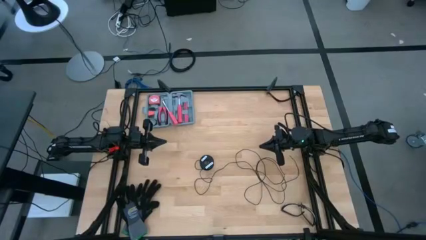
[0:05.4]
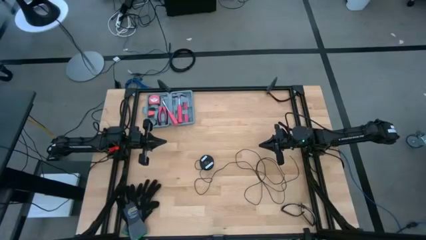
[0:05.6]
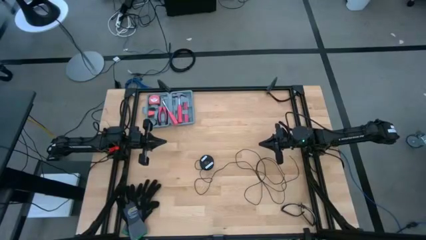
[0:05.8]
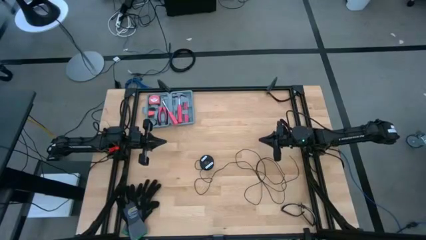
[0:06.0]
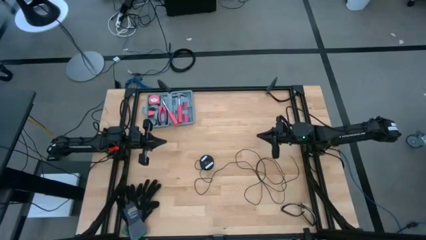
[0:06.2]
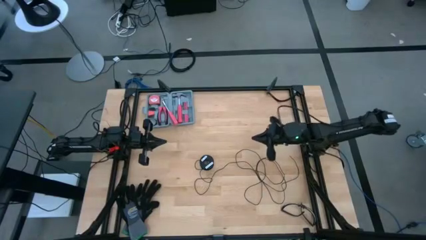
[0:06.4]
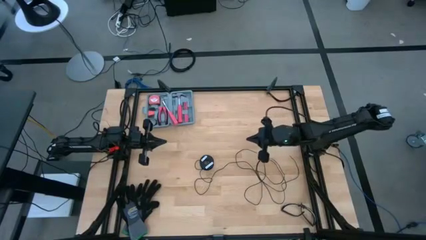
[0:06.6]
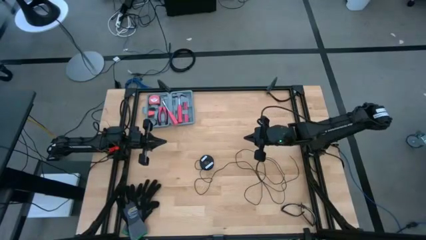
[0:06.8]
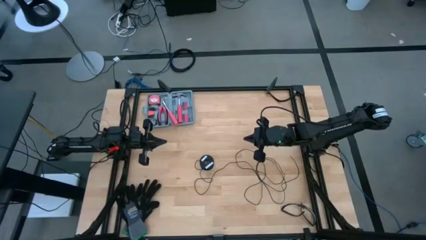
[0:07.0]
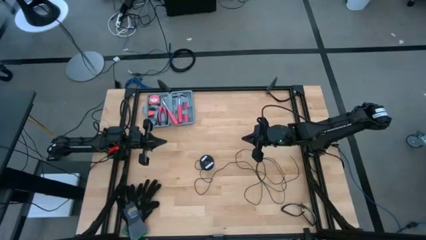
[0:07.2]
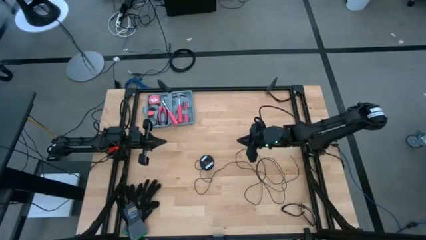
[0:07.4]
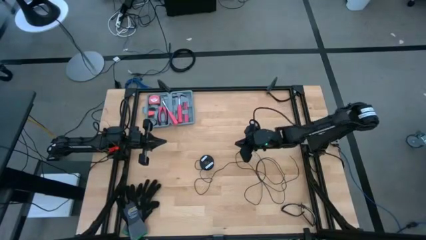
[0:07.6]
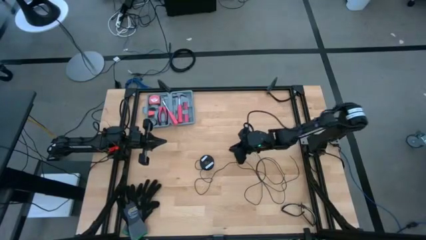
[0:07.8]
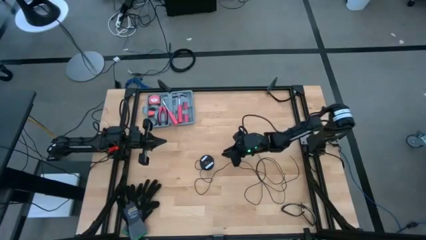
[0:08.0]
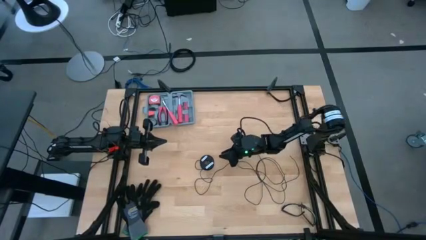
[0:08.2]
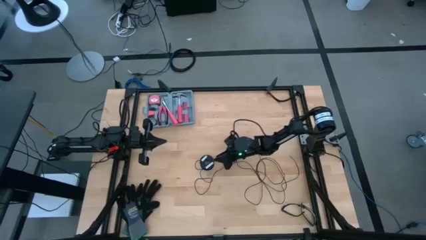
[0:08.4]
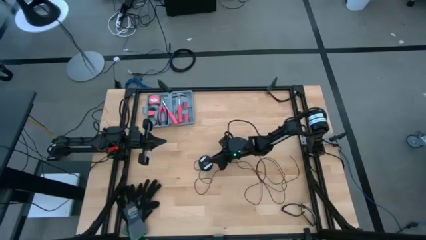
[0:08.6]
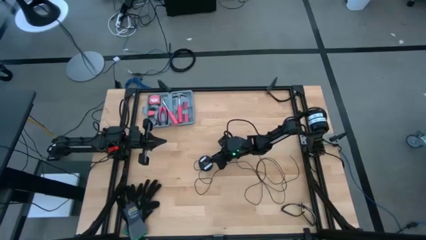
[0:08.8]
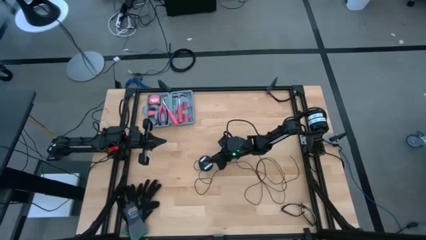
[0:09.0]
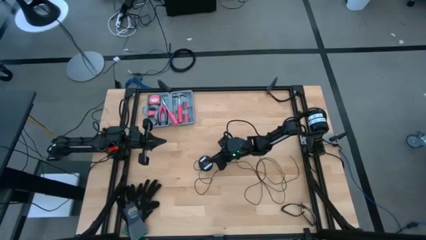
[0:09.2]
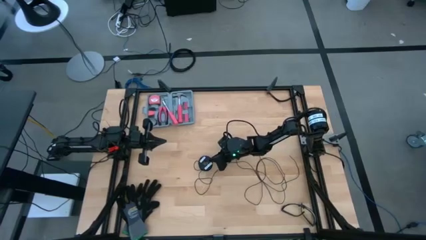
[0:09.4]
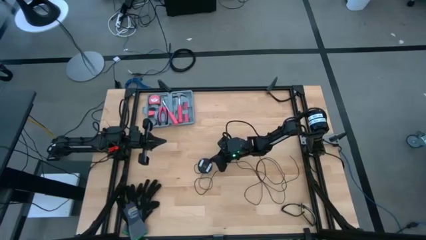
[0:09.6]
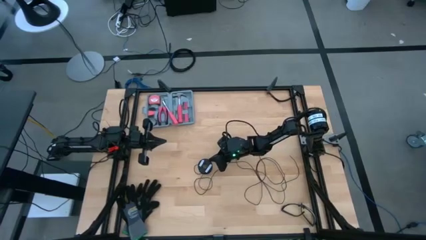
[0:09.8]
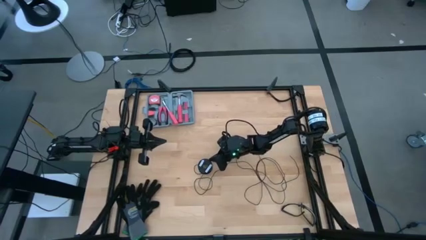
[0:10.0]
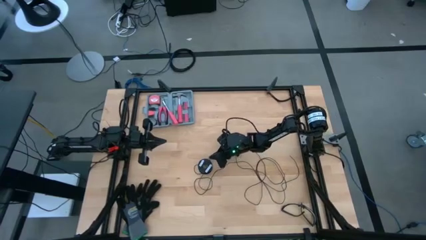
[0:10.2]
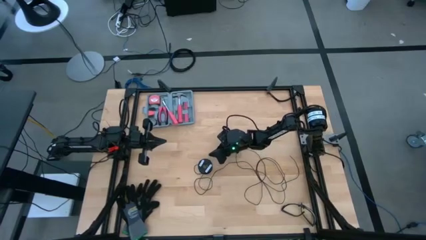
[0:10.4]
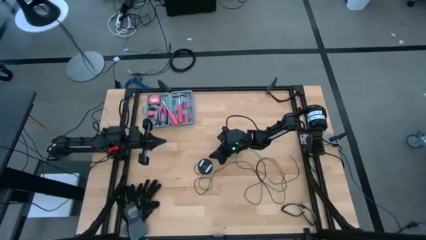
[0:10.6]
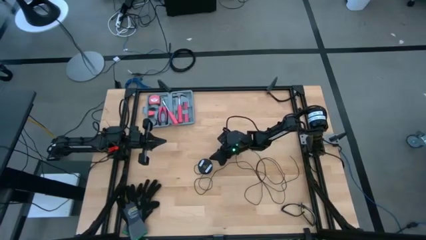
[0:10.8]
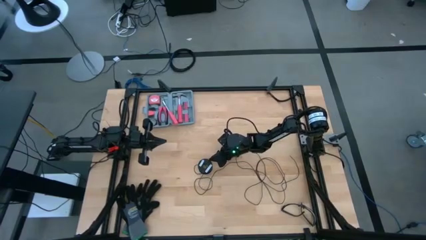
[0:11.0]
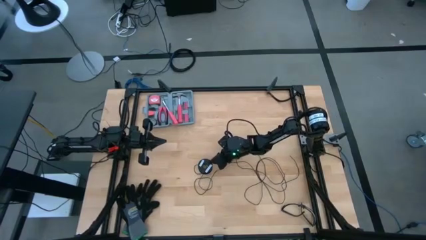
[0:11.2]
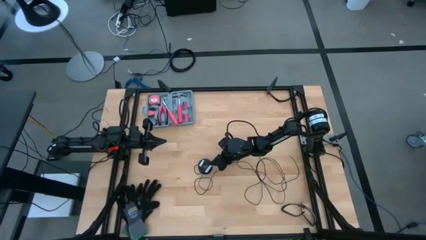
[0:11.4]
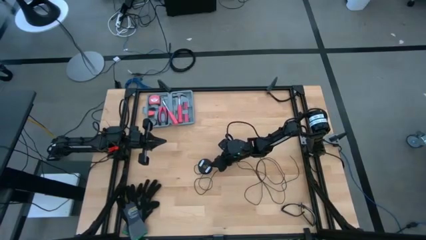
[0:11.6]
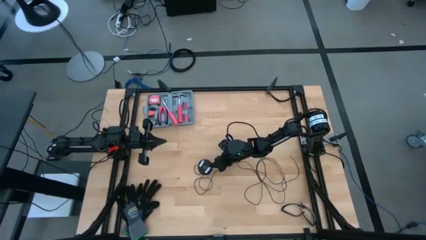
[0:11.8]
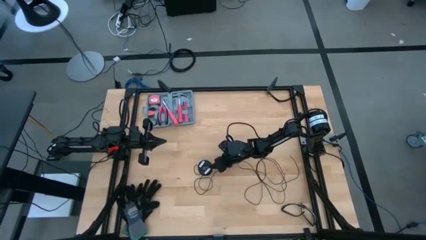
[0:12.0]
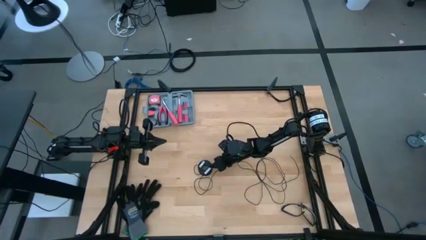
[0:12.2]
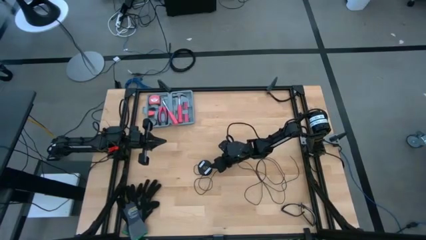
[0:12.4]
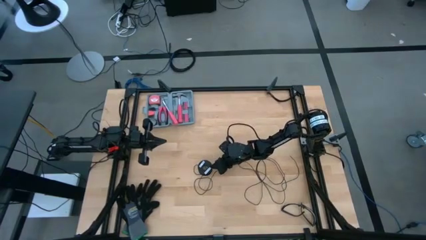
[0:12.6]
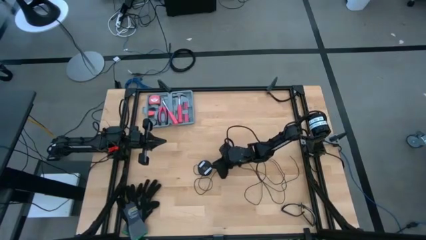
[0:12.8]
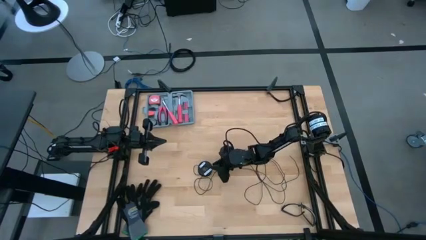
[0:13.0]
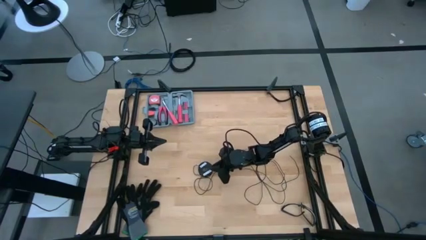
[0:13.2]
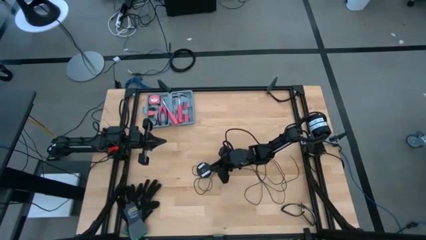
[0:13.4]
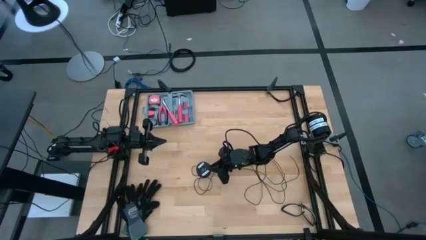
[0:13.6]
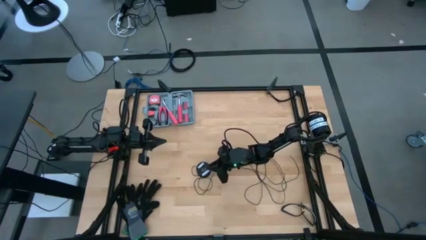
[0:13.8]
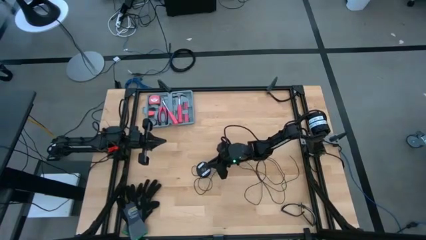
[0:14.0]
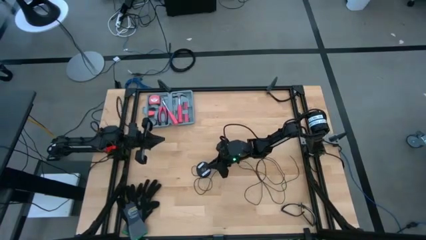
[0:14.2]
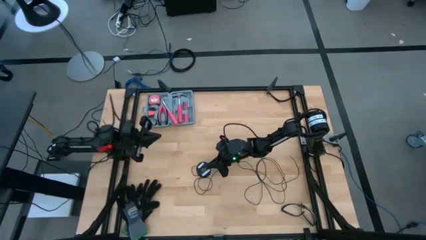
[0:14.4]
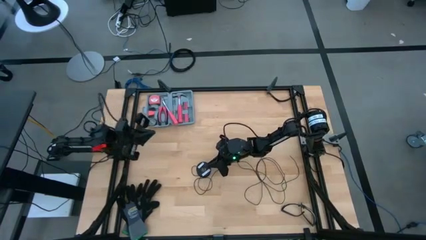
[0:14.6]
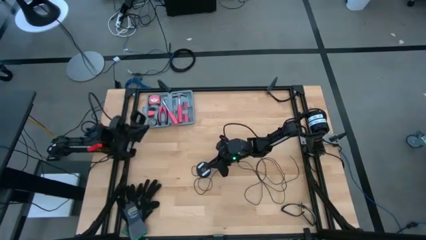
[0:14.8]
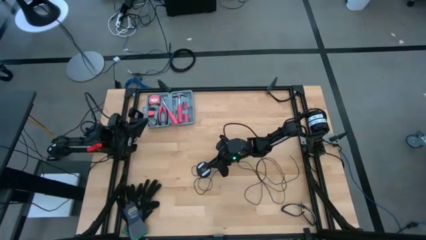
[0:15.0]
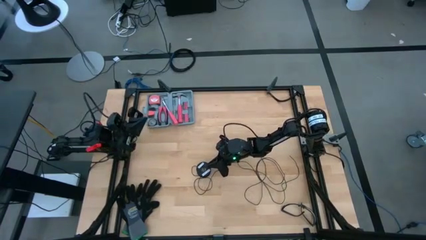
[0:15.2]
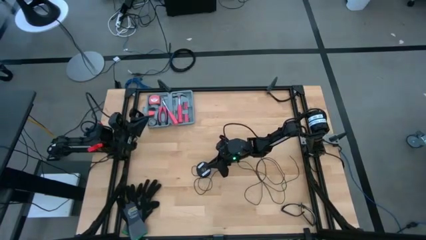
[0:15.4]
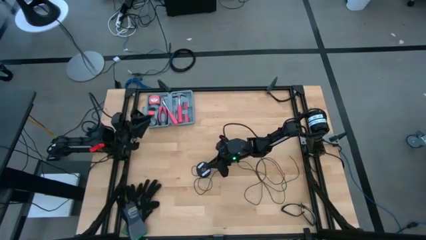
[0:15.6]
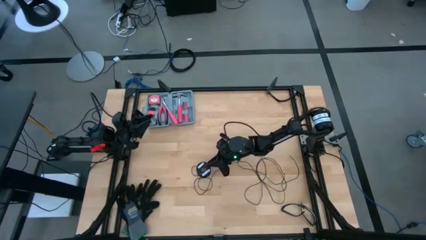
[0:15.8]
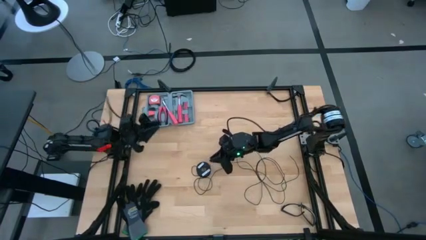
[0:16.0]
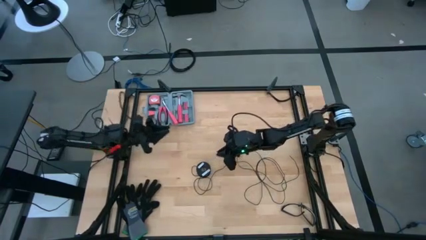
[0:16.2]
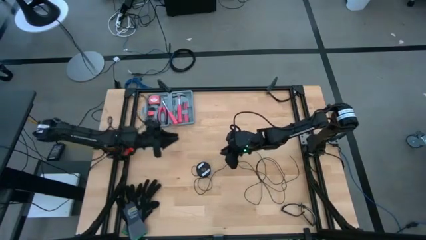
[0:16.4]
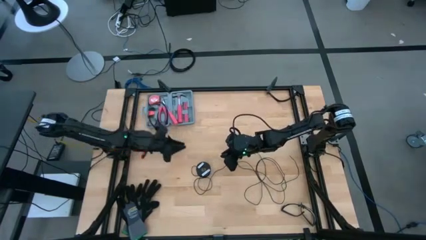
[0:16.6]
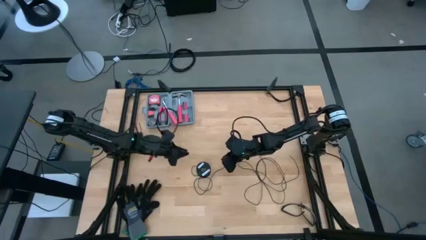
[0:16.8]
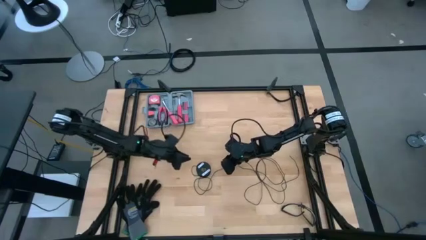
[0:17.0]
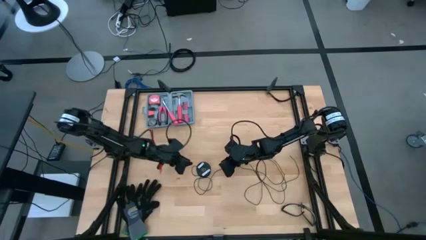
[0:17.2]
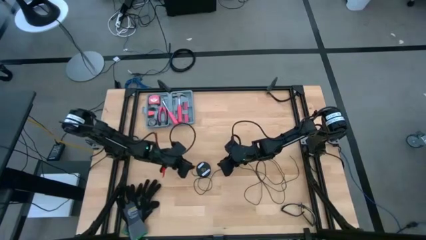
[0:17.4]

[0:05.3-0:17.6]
Task: Coil cords
Coil the black wire onto the spool

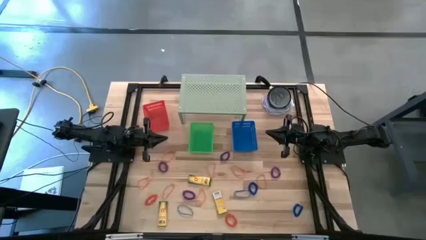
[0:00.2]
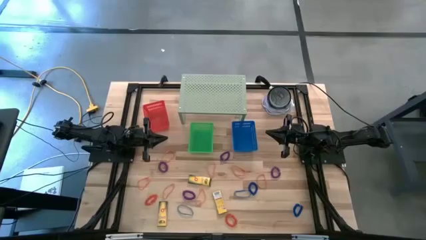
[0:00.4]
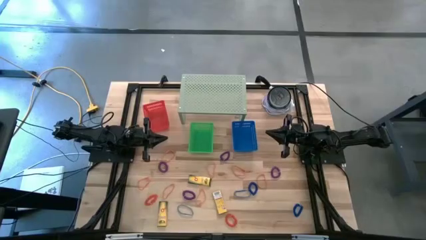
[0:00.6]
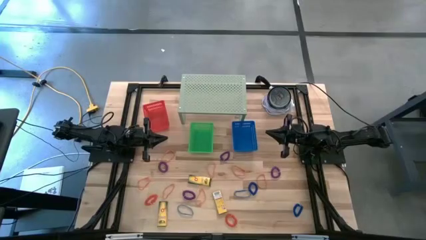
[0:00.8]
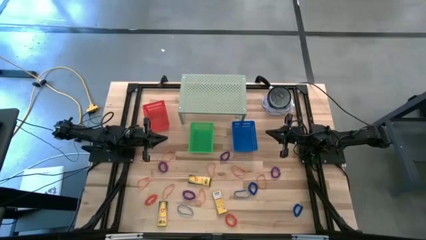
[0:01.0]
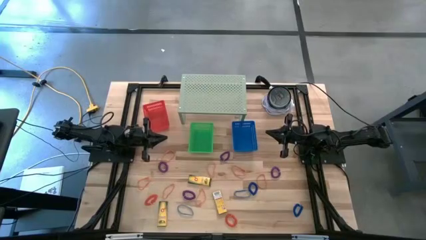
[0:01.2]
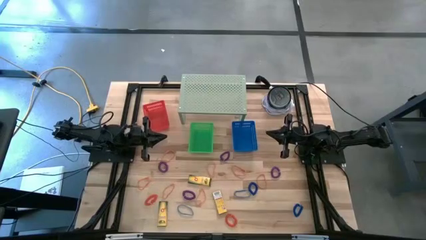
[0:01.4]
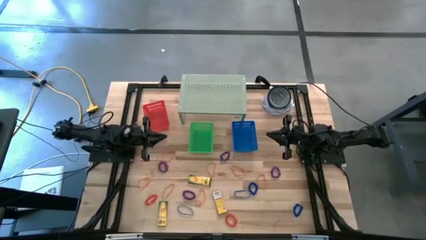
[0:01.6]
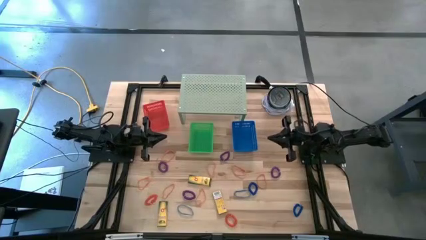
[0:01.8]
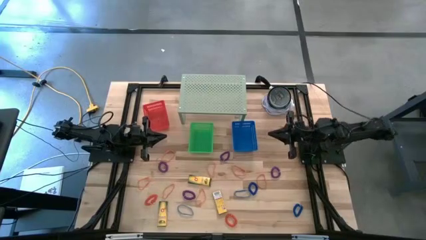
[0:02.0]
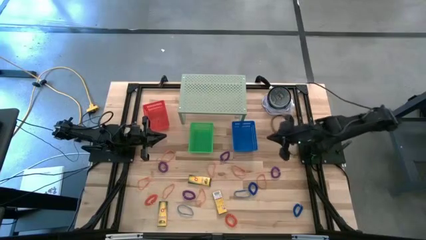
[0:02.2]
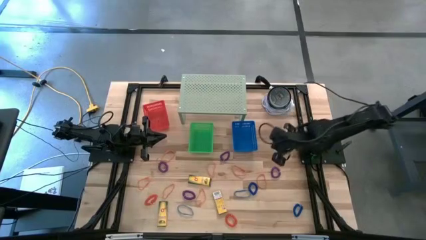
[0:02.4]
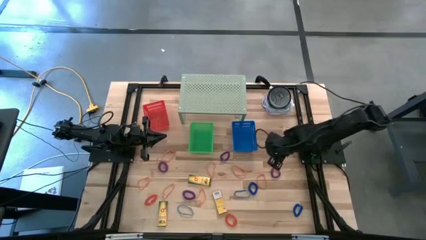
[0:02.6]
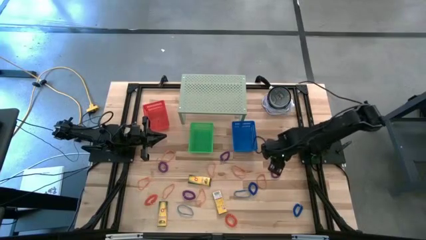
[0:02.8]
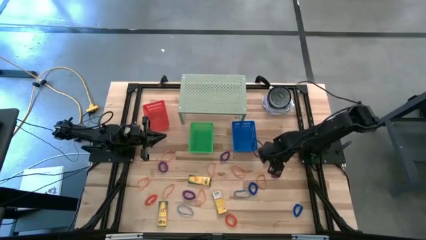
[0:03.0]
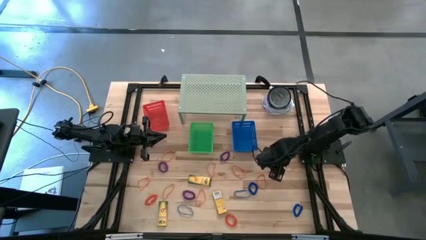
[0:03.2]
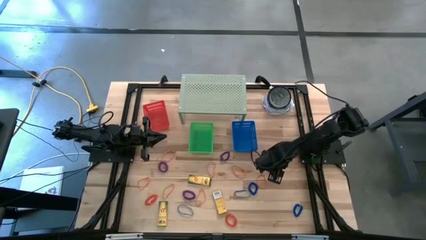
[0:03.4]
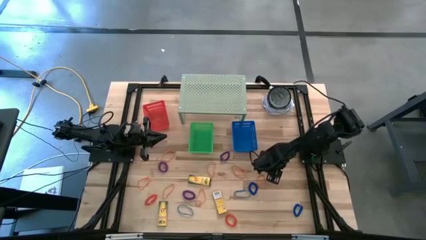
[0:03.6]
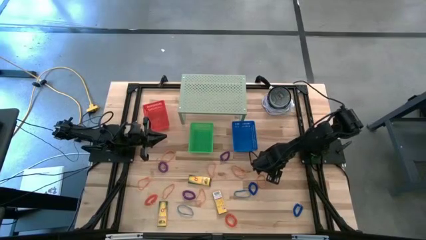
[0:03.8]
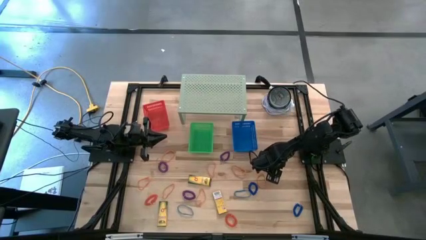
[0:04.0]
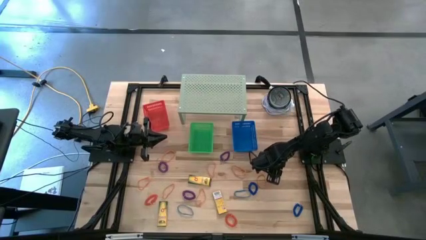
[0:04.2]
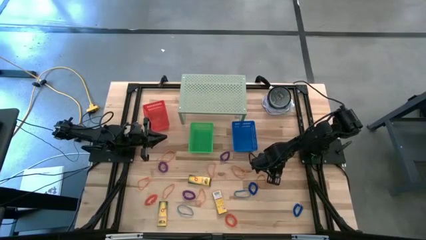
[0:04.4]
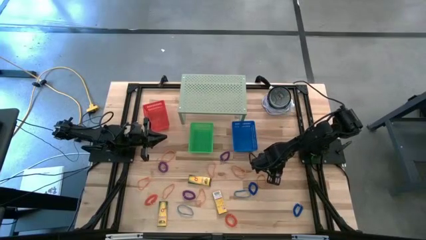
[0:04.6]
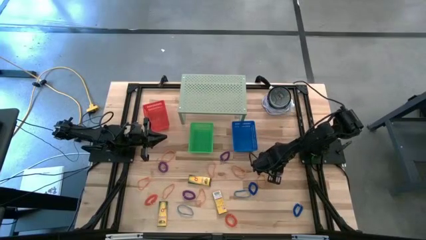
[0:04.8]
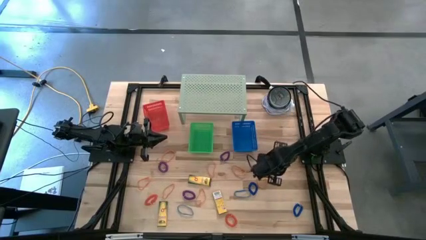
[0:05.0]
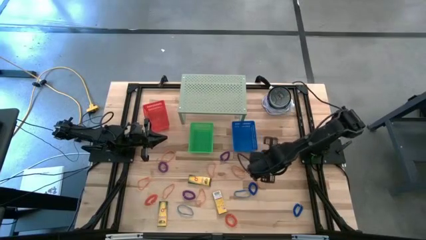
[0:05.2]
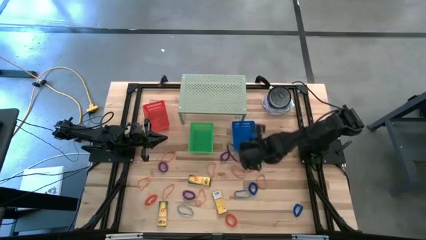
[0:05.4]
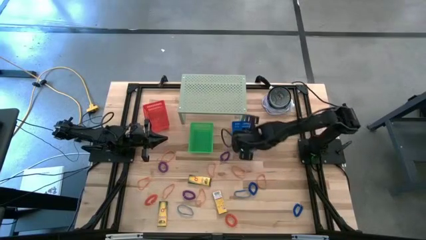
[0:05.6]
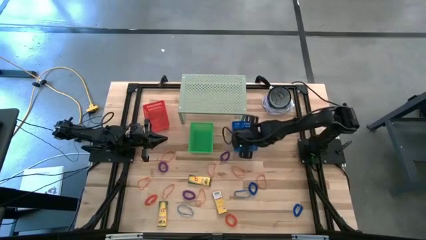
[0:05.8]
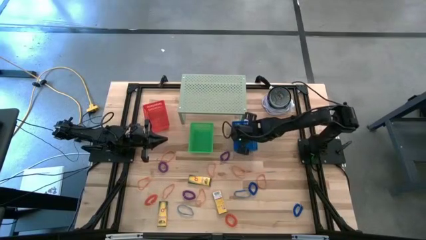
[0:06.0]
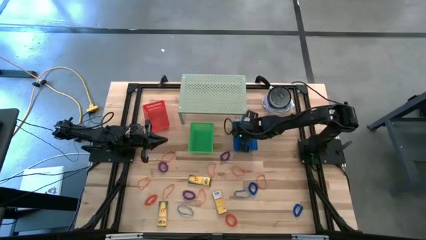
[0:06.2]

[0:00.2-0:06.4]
Task: Pick & Place Office Desk Supplies
Put the violet spring keychain into the blue bin
